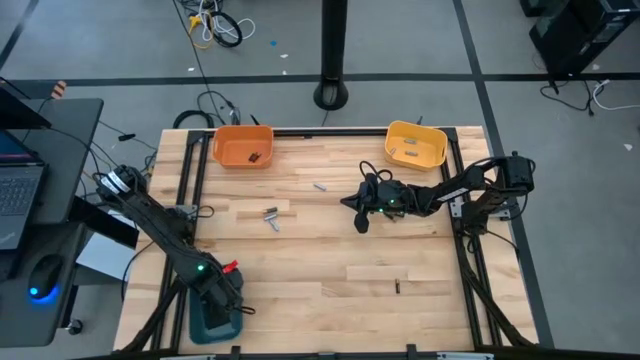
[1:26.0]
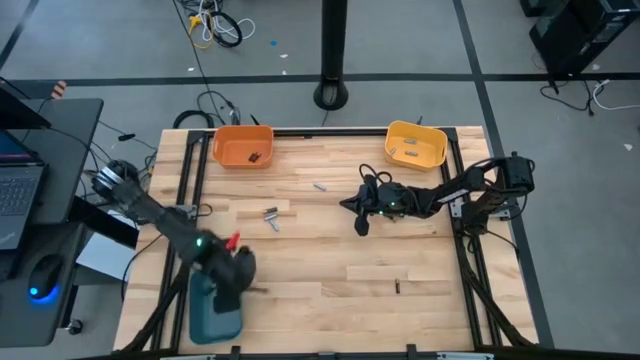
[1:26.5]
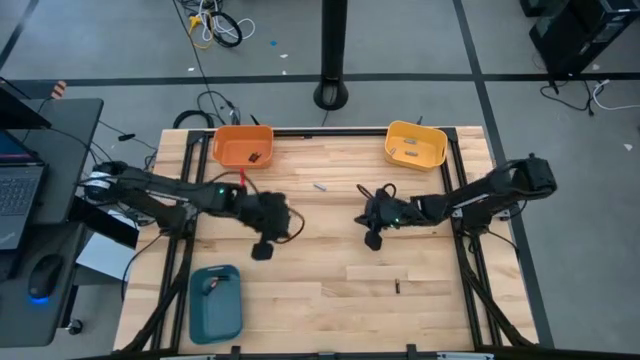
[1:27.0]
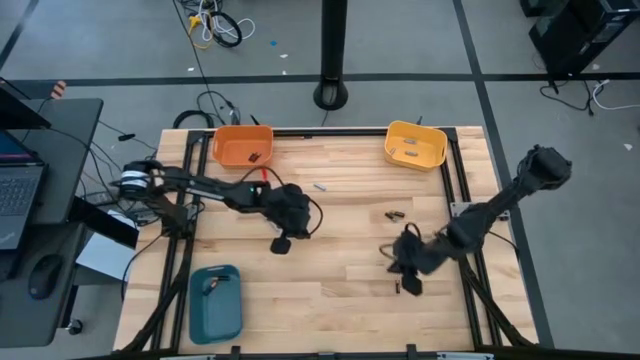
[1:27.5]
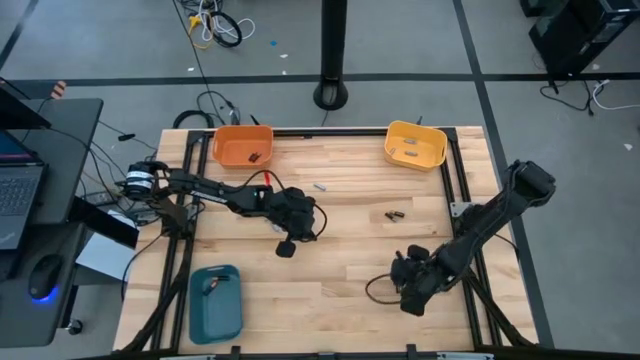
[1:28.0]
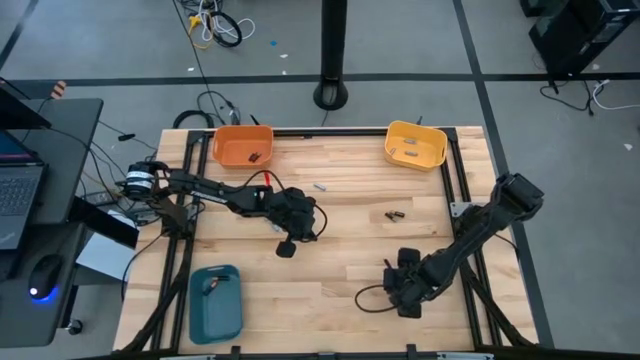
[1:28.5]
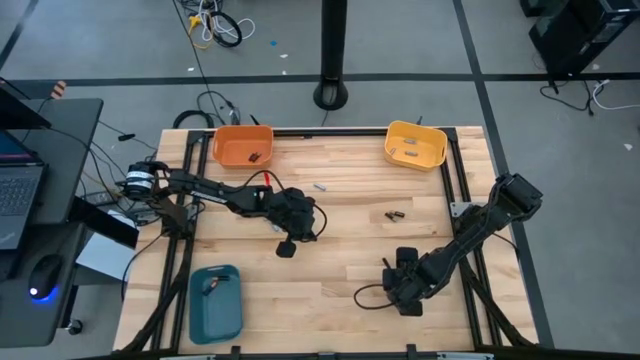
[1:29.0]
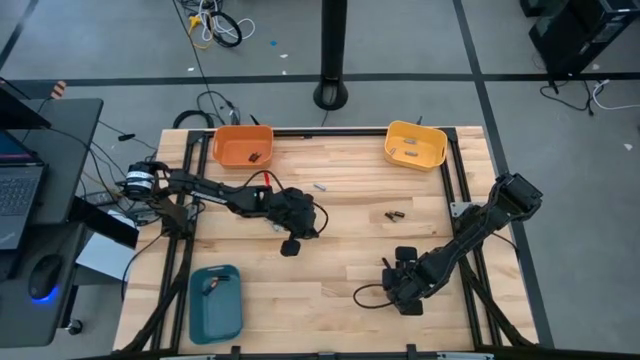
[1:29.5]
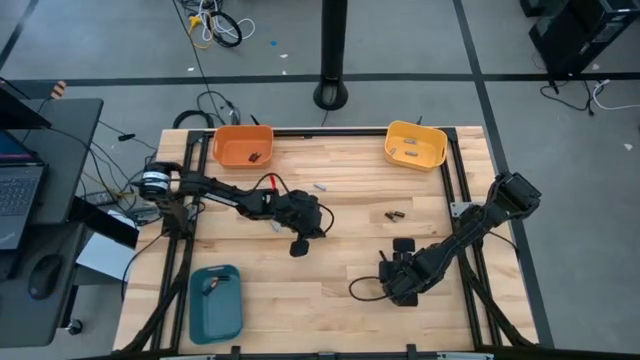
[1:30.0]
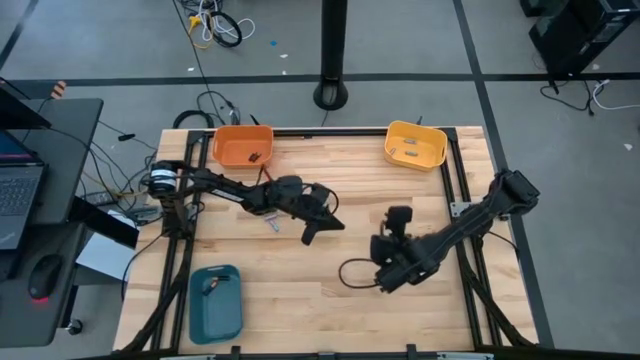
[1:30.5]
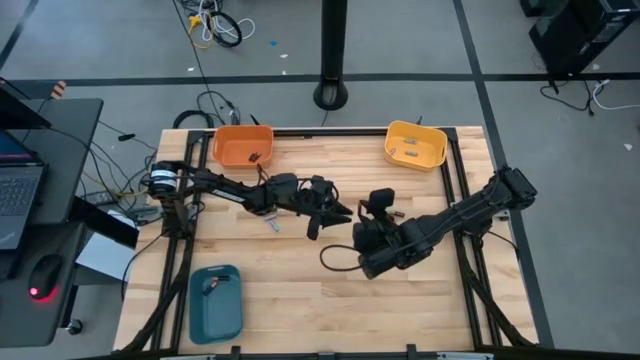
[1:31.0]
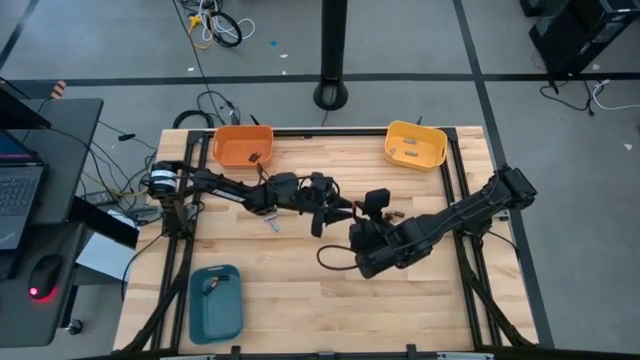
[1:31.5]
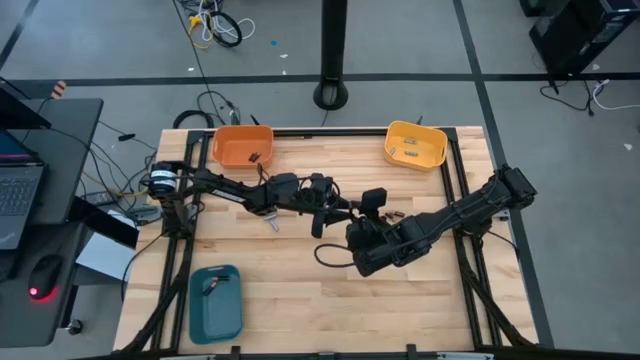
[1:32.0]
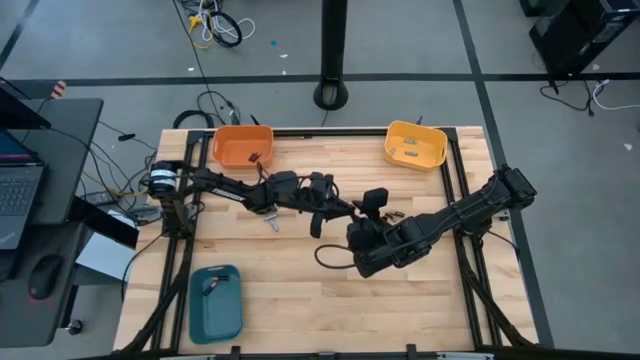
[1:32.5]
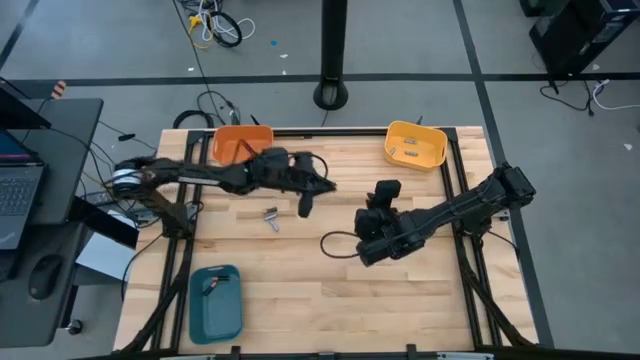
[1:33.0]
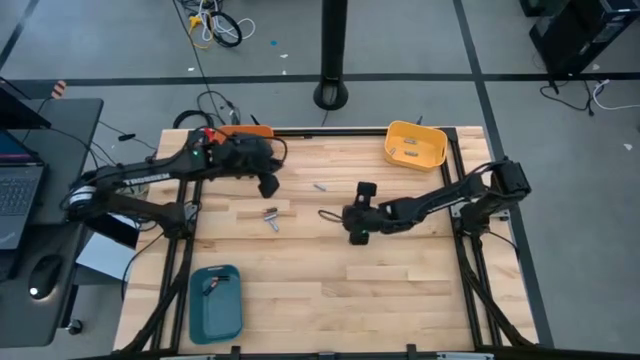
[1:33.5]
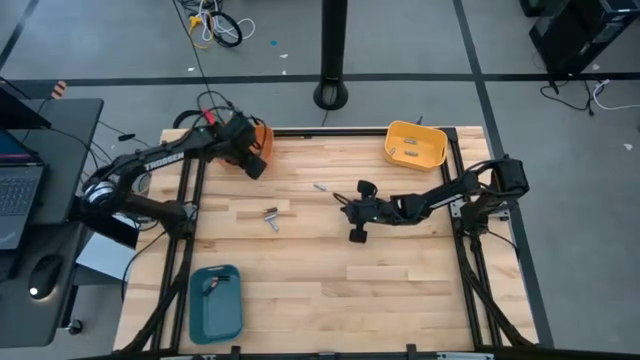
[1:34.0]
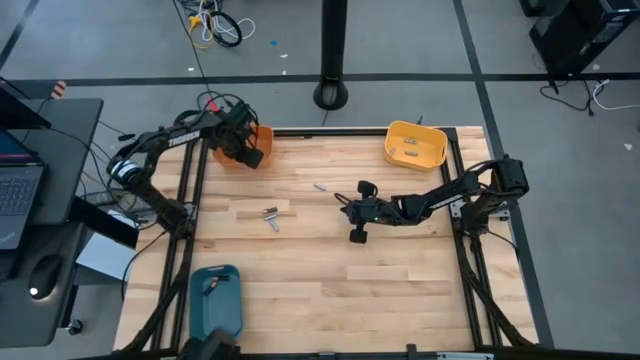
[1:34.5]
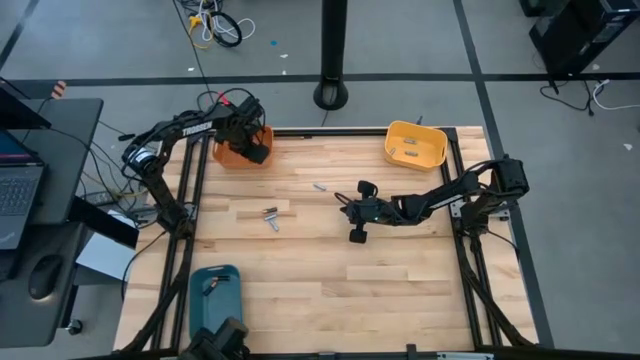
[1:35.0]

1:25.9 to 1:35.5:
Task: Sort batteries
Put the small copper and black battery into the orange bin

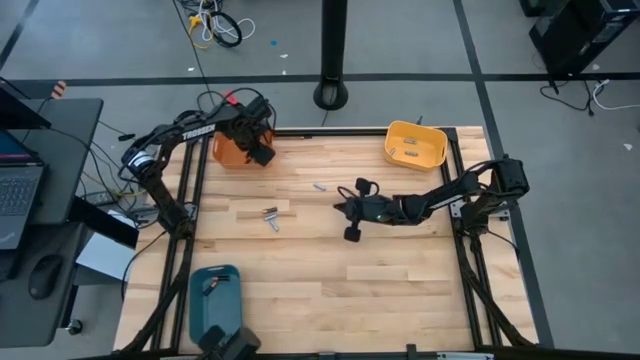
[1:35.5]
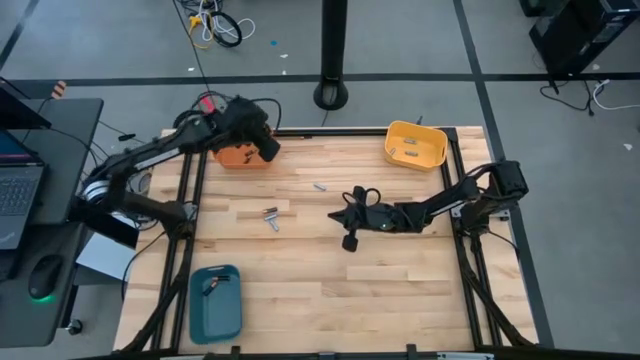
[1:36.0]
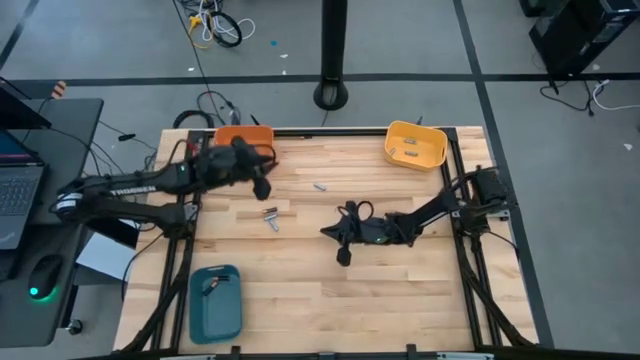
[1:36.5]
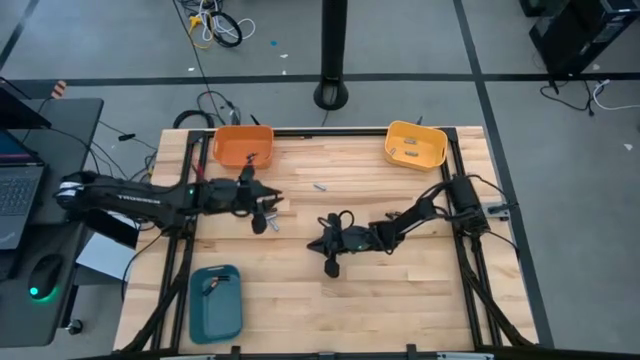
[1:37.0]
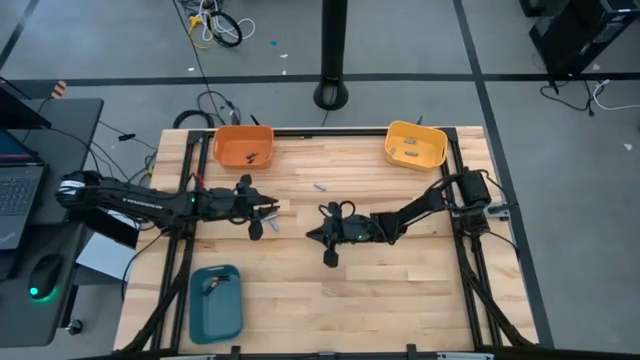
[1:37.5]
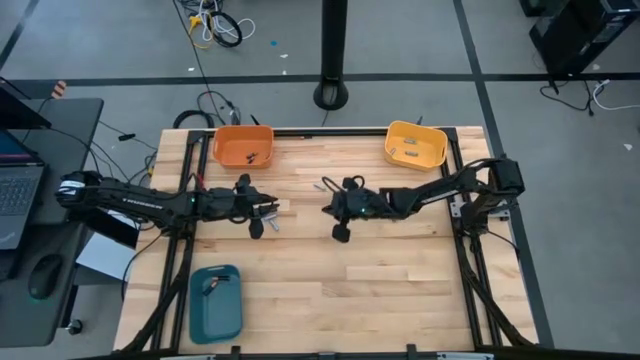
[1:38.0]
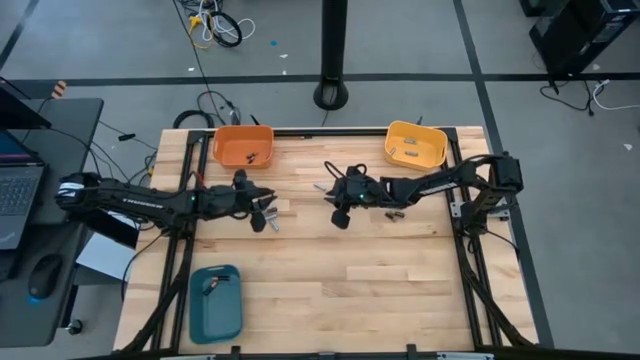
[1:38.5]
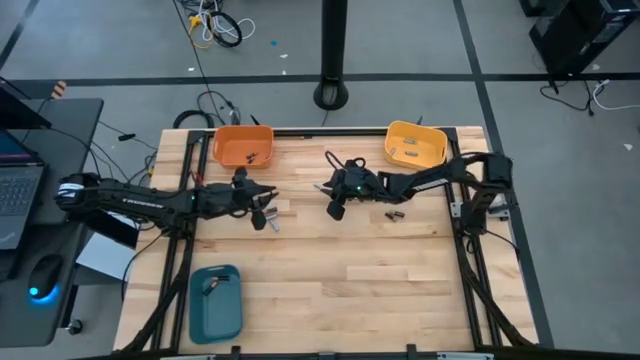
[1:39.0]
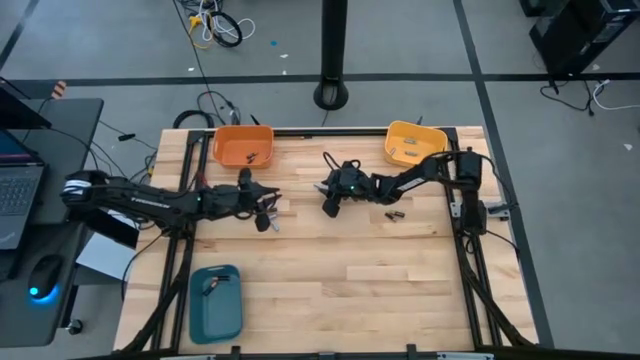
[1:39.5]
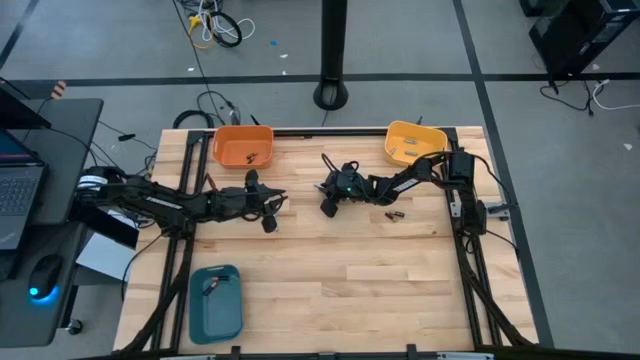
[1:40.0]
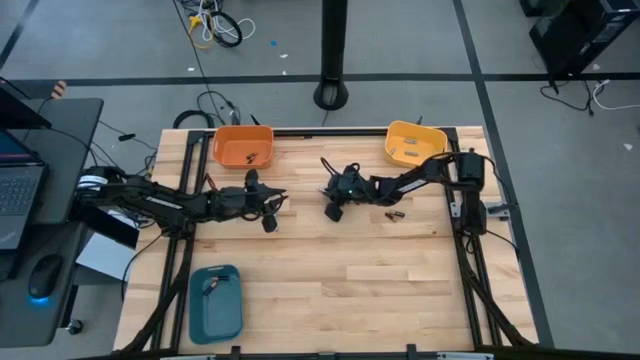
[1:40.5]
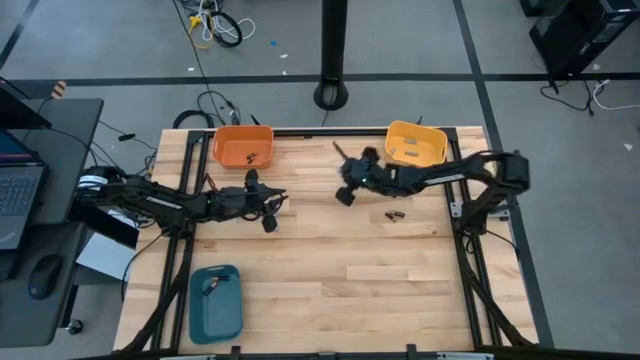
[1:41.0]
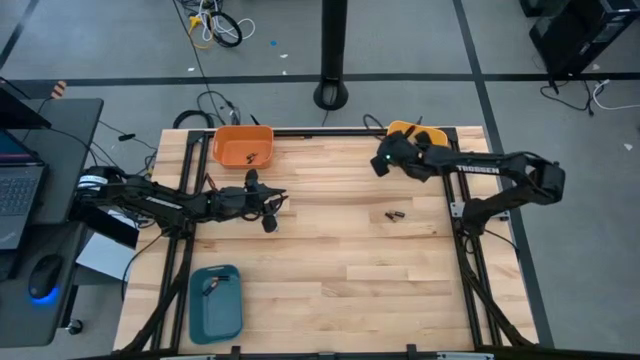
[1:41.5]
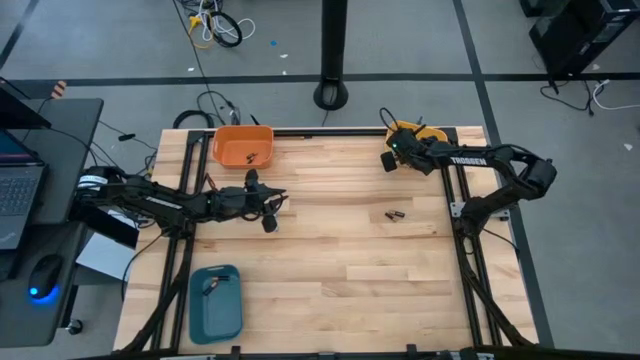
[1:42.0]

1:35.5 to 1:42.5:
Put the small gray battery into the yellow bin

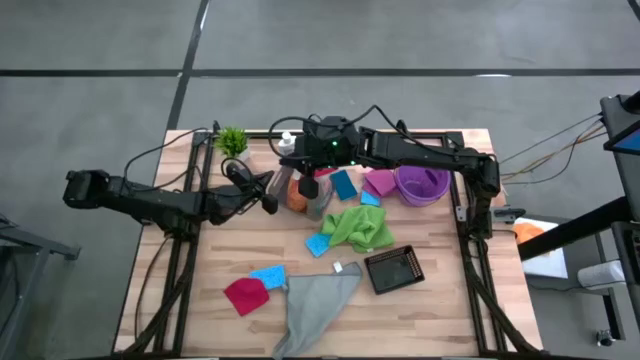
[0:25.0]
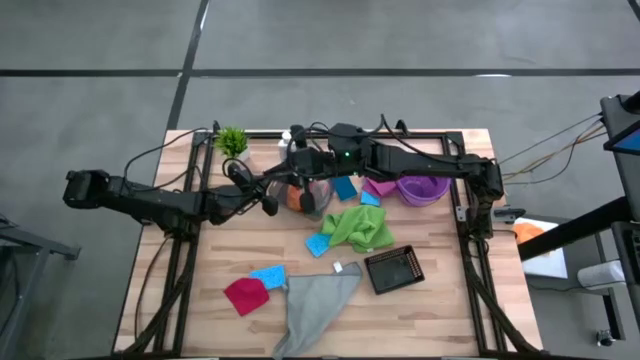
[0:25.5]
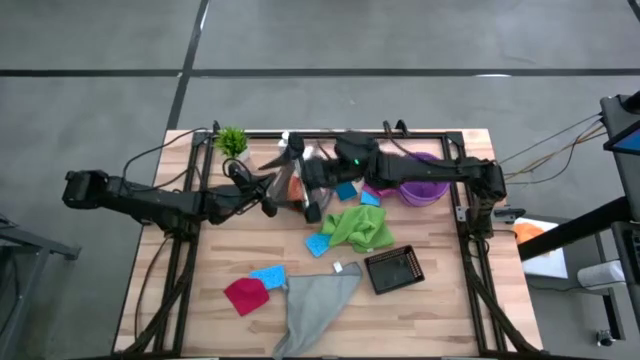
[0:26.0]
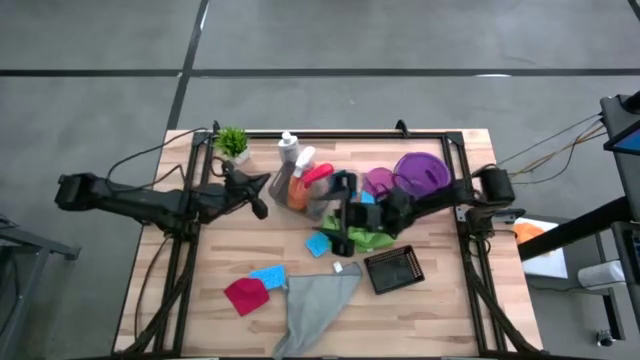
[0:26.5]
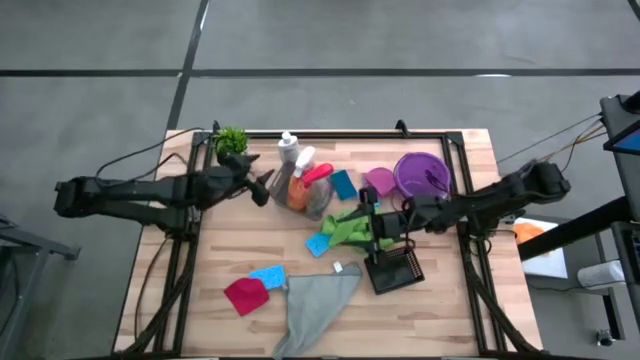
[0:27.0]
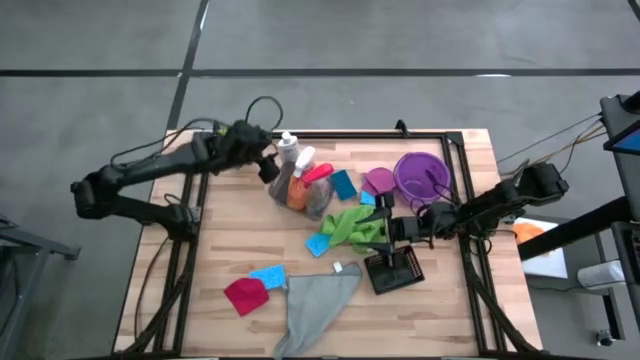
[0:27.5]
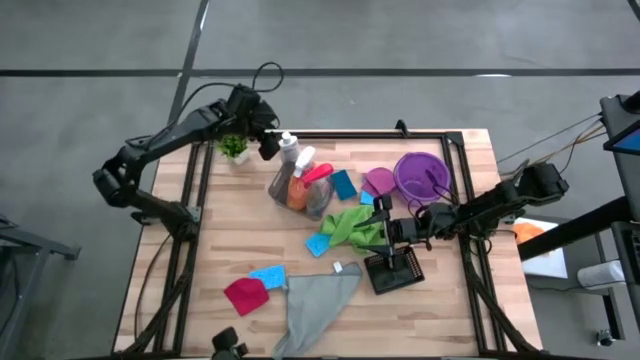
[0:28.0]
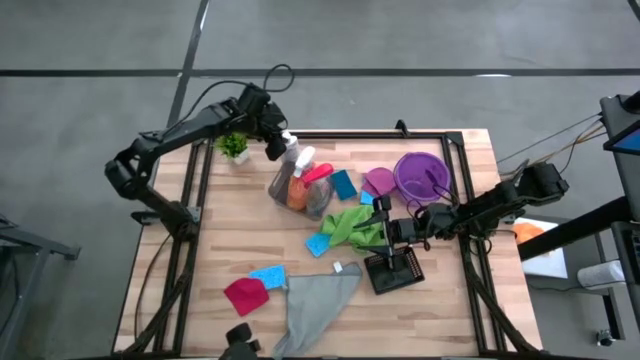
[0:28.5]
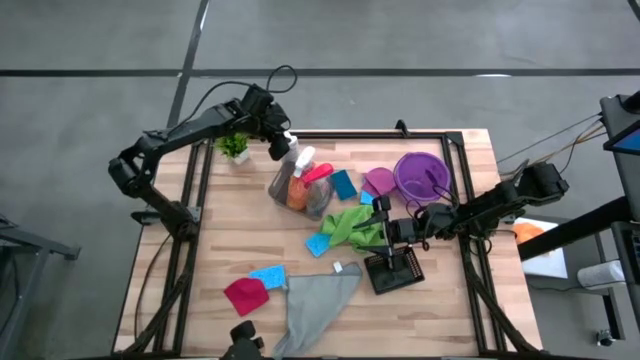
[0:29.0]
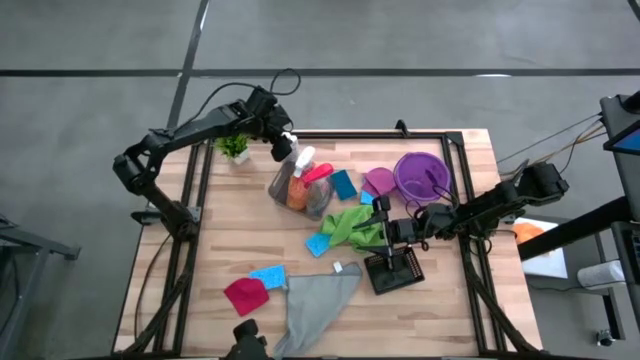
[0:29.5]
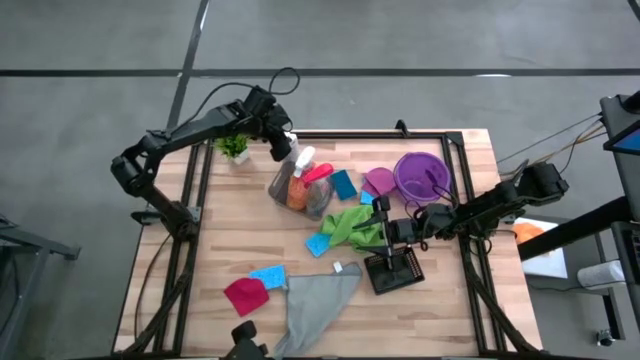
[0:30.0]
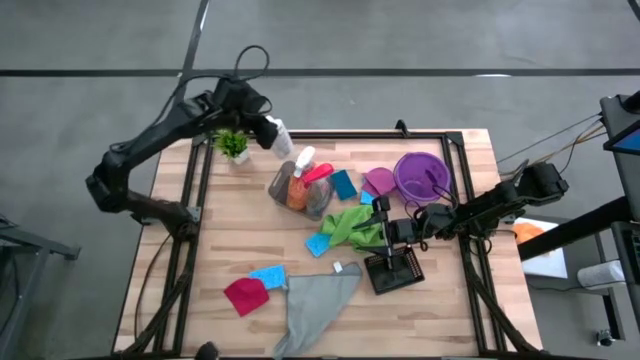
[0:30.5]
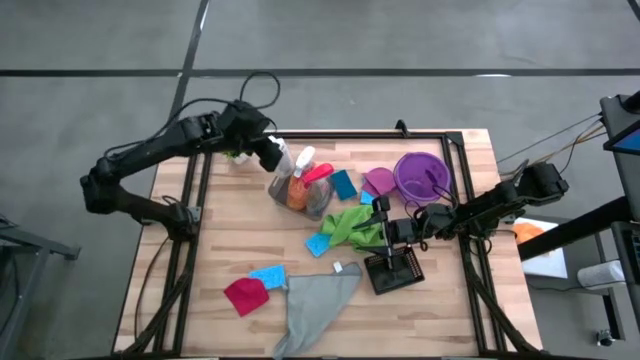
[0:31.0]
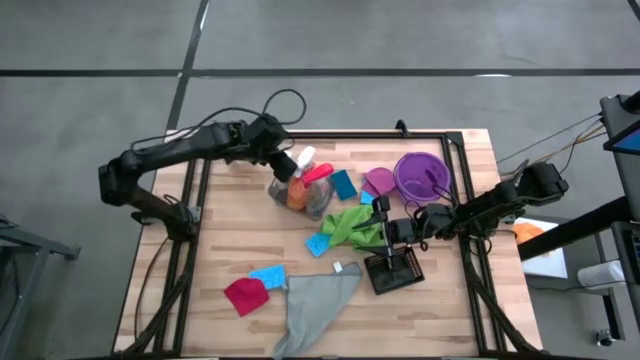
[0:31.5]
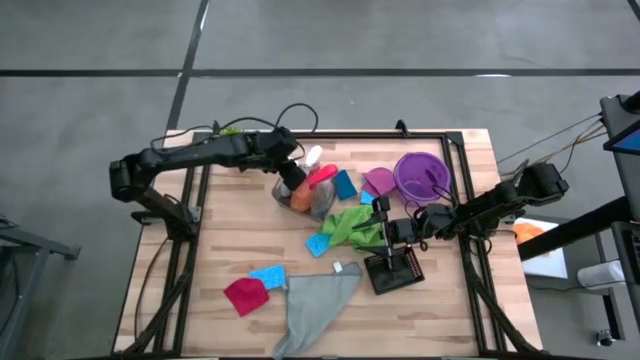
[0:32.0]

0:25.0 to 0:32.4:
Task: Pick & Place Kitchen Items
Put the white plastic restorer bottle into the black bin
